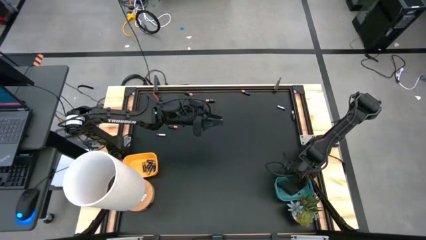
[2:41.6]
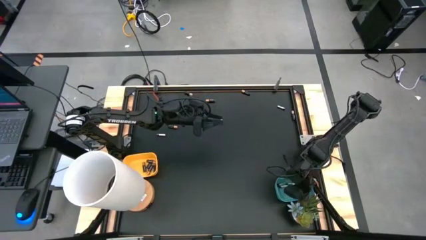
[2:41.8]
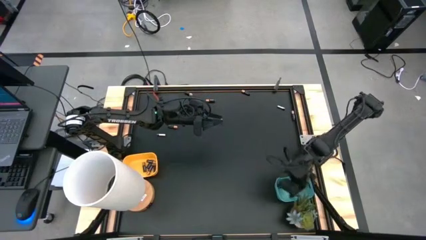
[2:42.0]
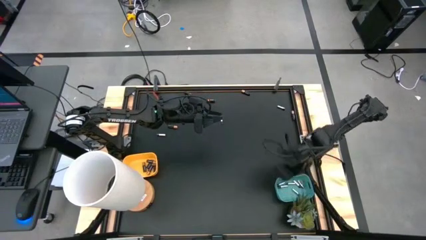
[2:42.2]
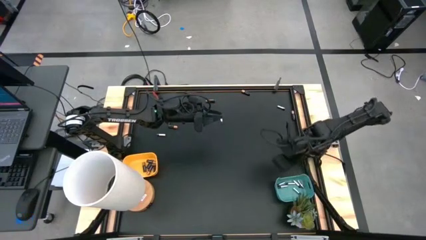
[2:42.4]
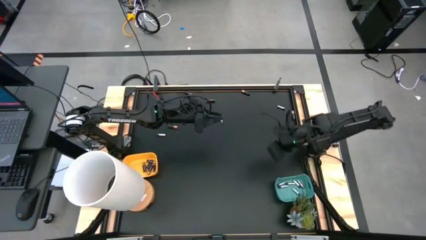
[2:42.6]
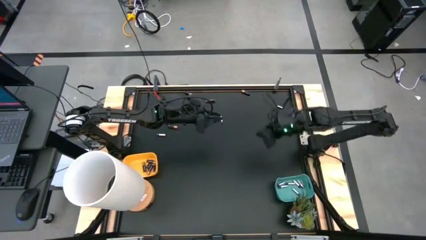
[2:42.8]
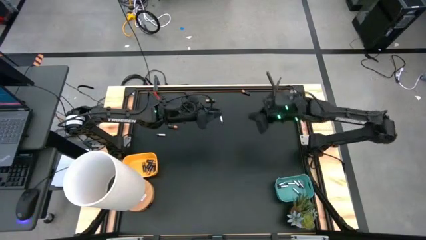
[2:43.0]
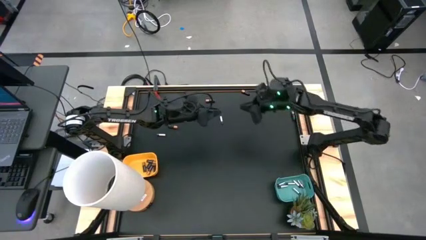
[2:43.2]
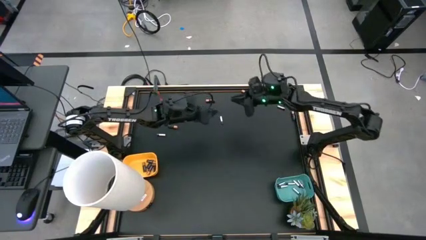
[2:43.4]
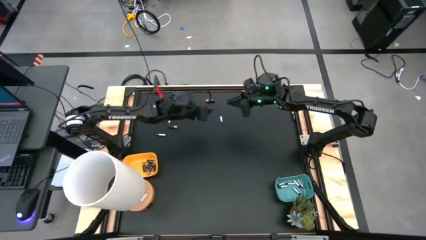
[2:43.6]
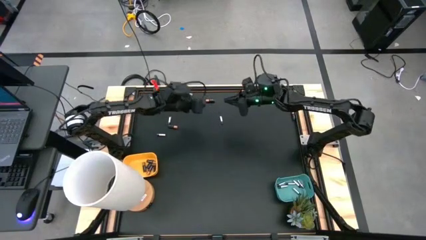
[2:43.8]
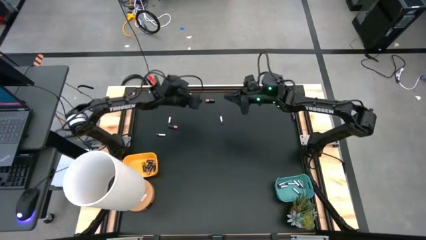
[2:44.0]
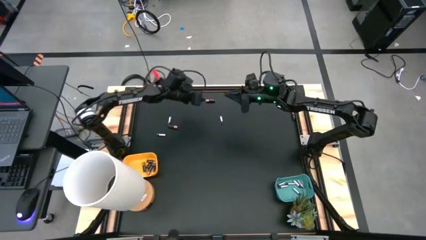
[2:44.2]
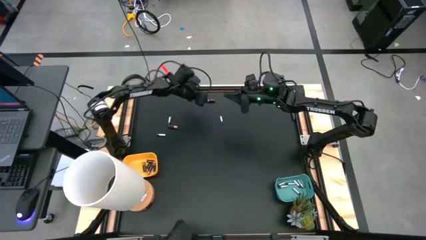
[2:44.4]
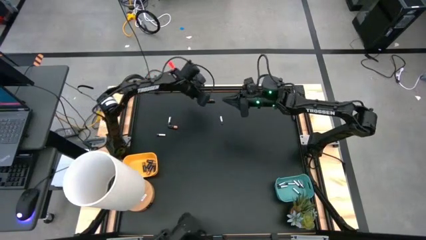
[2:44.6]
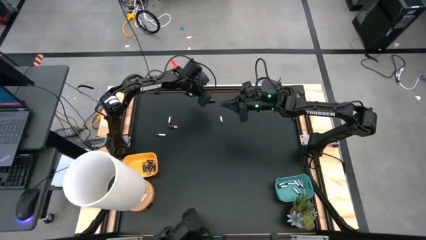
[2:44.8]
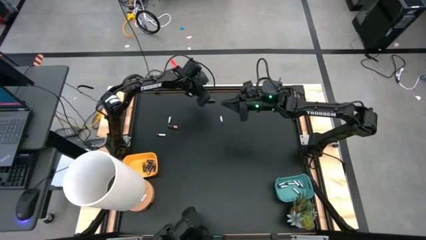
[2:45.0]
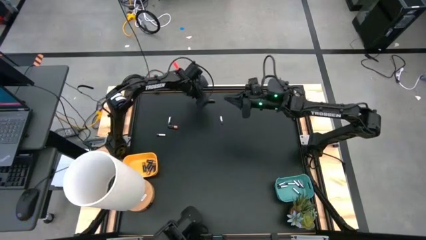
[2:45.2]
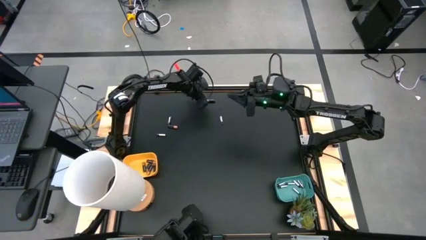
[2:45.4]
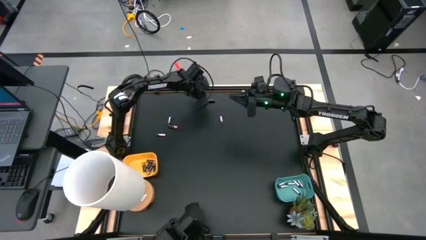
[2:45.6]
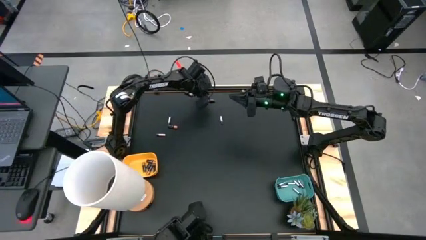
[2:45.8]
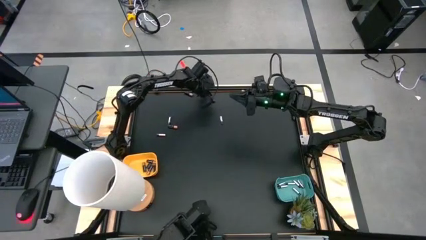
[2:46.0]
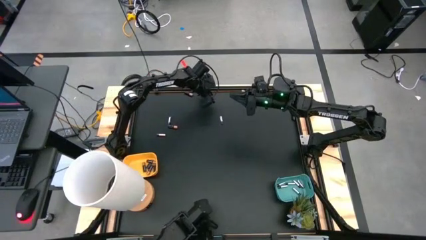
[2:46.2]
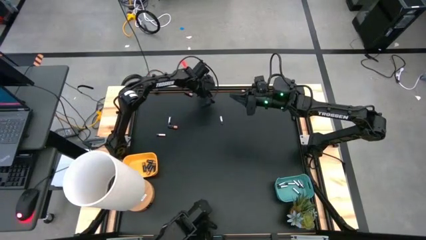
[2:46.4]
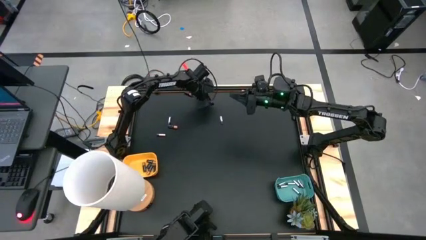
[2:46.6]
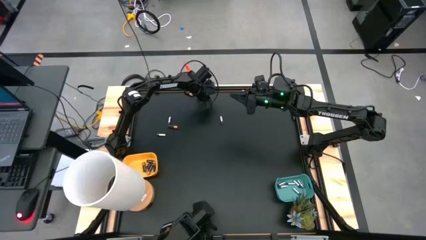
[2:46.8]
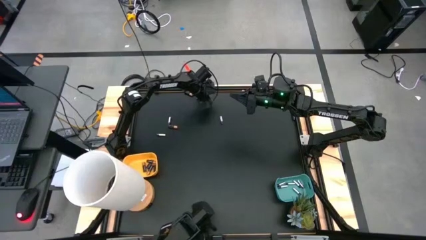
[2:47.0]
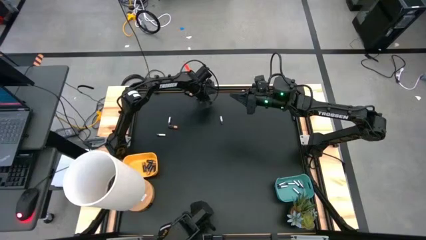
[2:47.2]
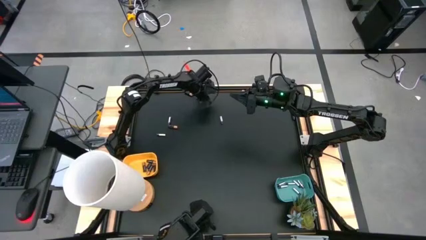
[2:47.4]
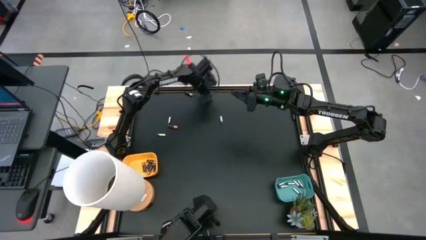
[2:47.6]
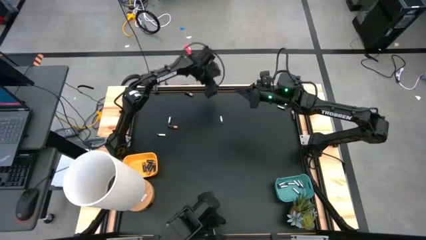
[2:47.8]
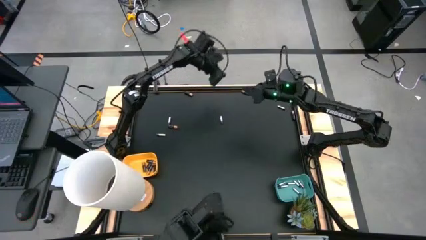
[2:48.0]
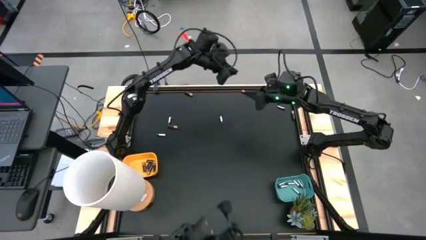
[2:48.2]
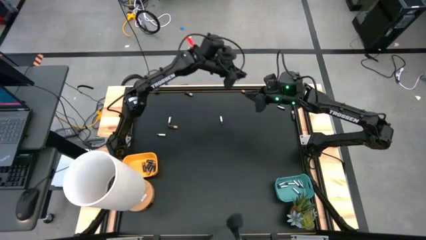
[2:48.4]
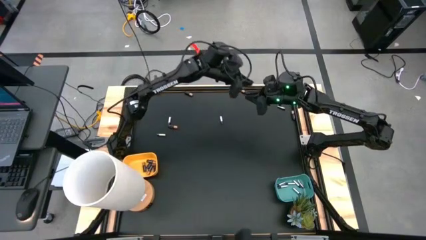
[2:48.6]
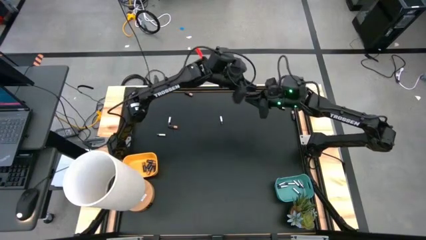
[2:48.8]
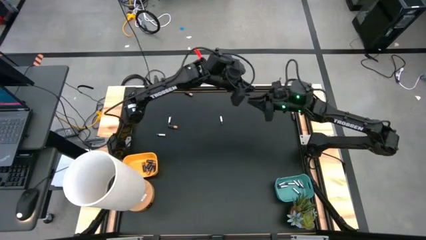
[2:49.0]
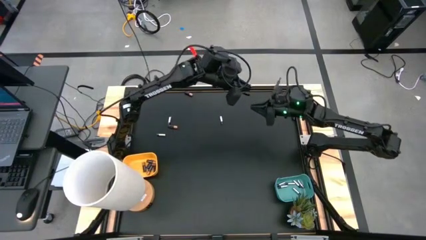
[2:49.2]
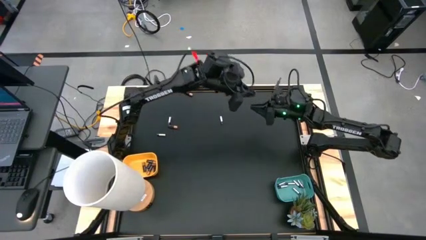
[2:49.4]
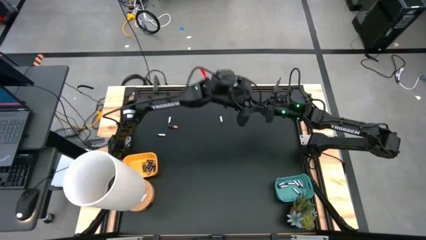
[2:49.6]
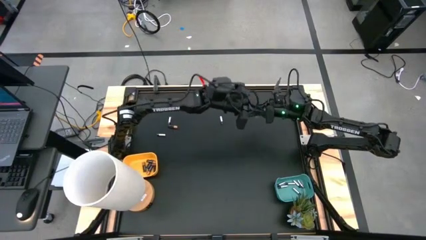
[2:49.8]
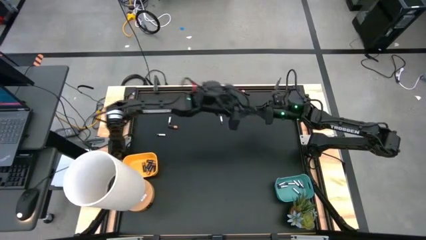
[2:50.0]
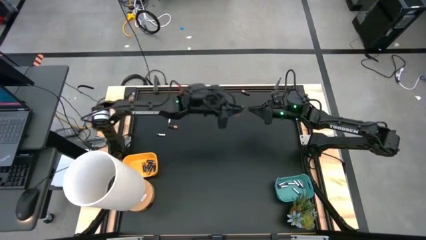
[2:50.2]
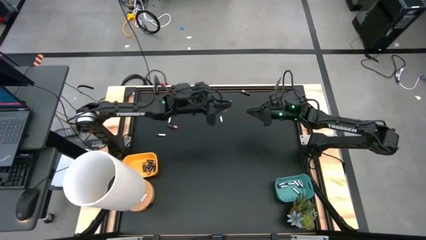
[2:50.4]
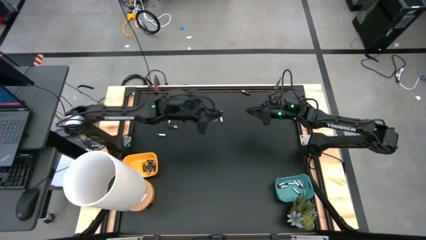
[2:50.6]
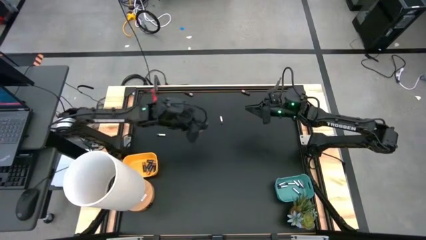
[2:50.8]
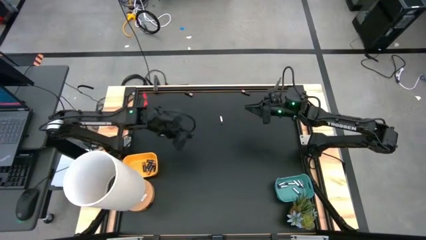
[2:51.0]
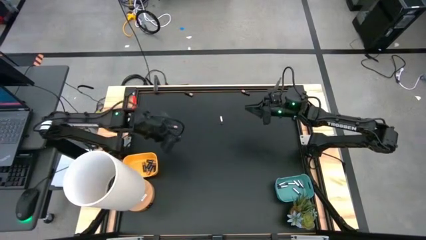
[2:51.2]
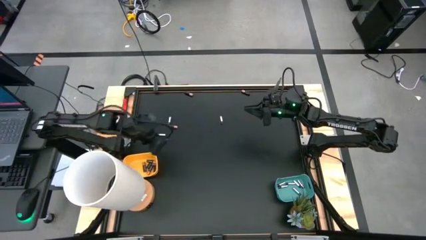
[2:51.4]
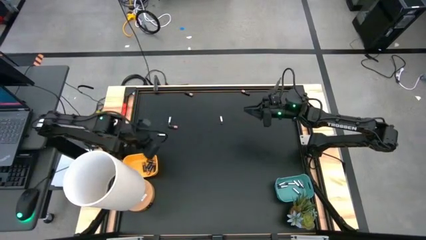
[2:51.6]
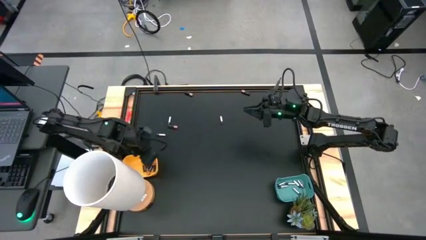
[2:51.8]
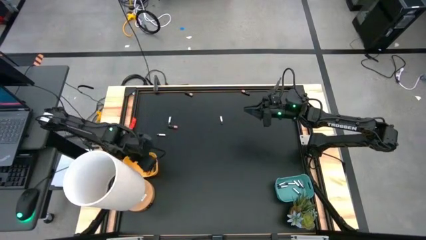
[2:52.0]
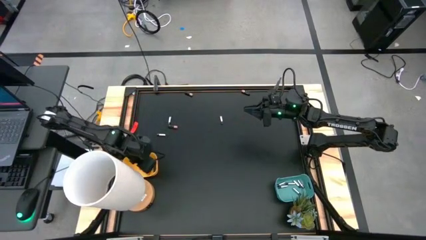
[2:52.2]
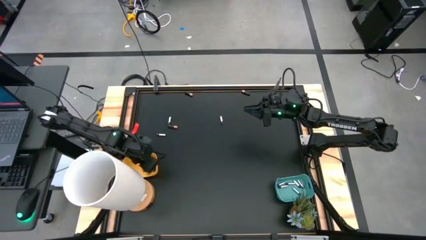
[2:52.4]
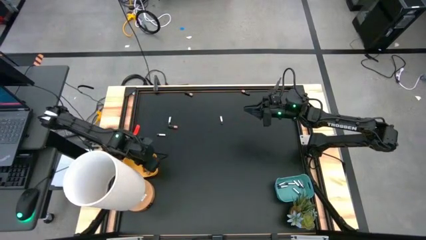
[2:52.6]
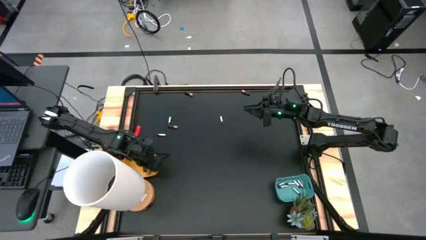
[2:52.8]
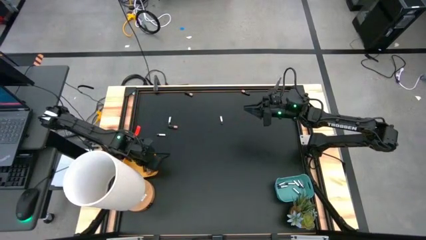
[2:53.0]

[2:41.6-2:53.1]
Task: Sort batteries
Put the black battery into the yellow bin

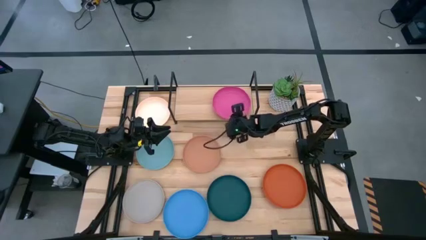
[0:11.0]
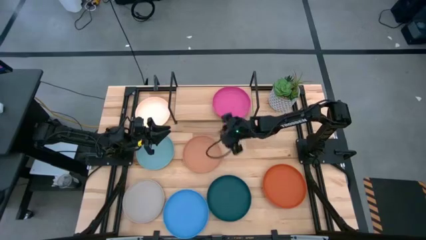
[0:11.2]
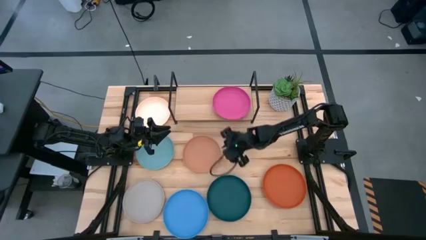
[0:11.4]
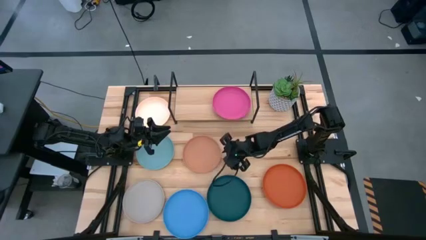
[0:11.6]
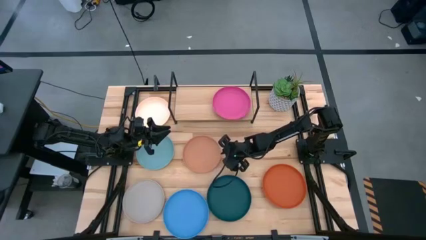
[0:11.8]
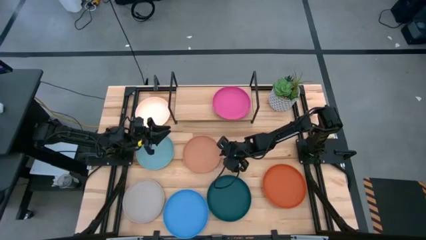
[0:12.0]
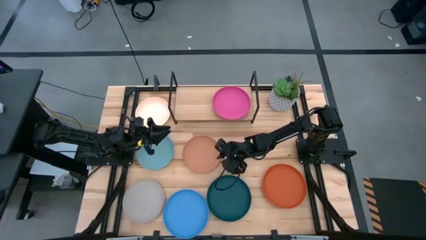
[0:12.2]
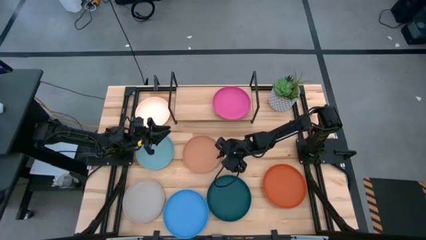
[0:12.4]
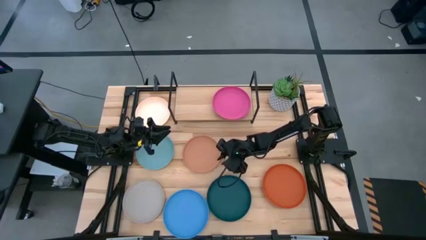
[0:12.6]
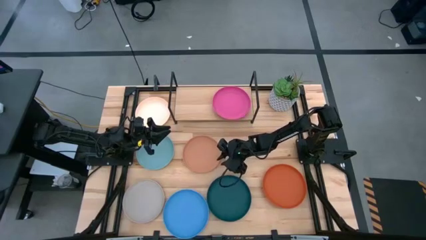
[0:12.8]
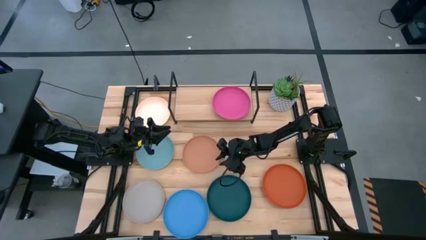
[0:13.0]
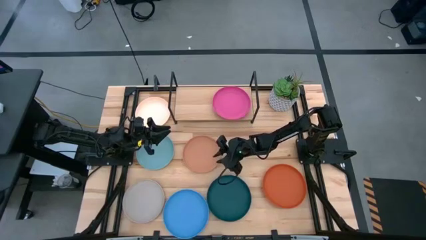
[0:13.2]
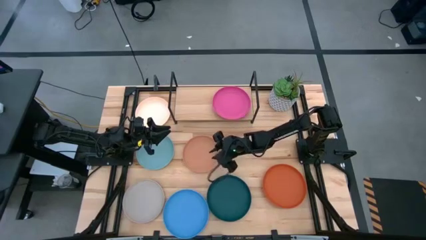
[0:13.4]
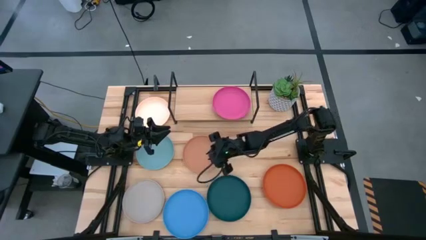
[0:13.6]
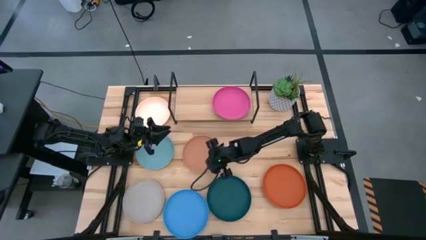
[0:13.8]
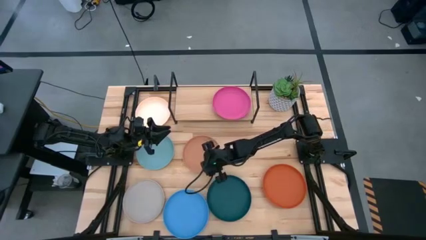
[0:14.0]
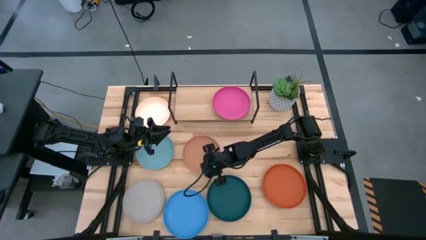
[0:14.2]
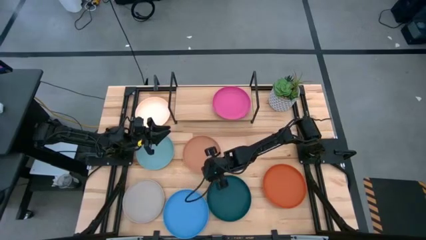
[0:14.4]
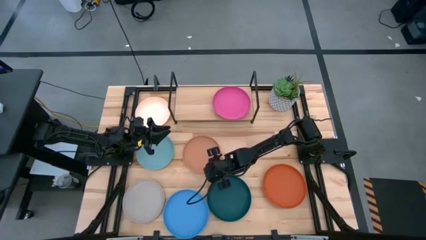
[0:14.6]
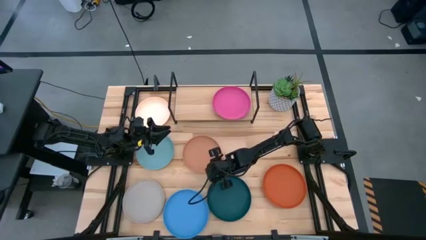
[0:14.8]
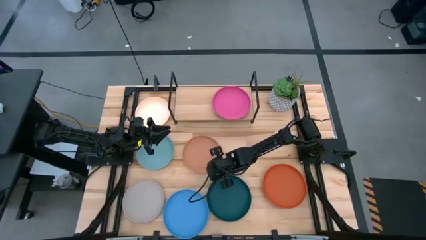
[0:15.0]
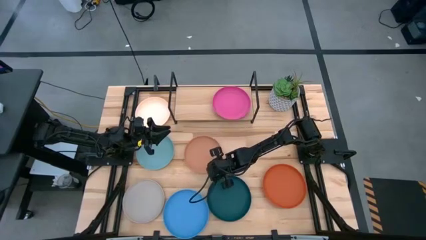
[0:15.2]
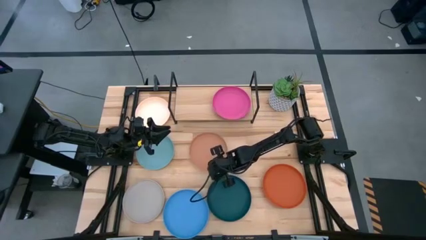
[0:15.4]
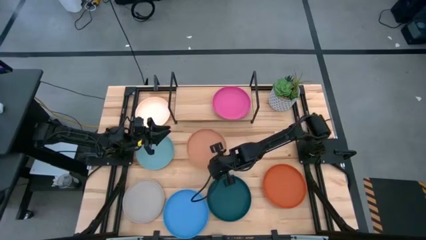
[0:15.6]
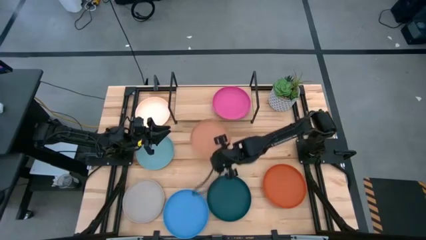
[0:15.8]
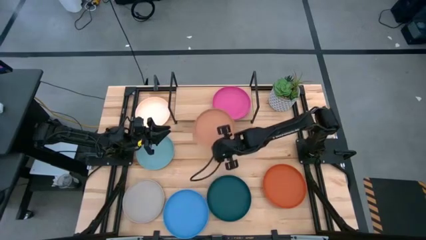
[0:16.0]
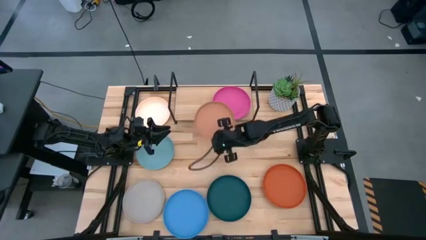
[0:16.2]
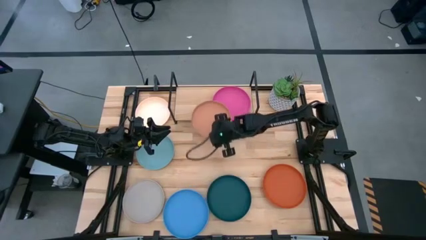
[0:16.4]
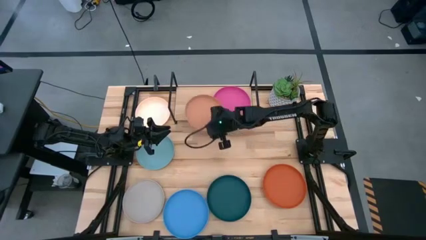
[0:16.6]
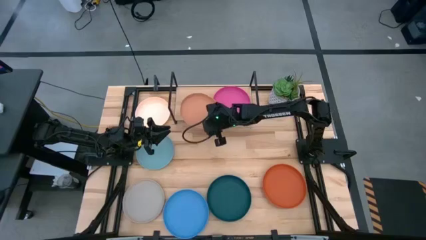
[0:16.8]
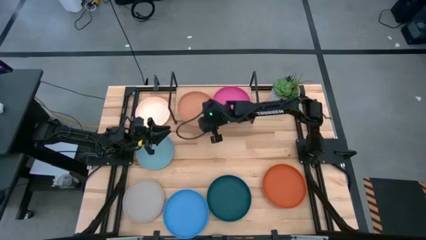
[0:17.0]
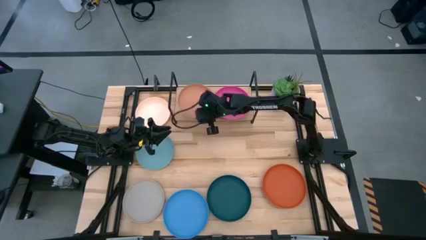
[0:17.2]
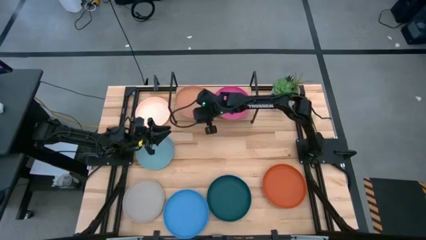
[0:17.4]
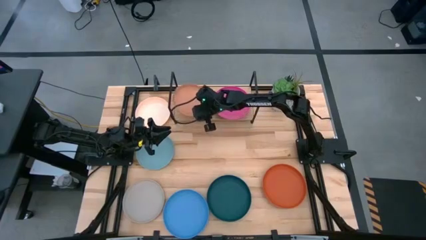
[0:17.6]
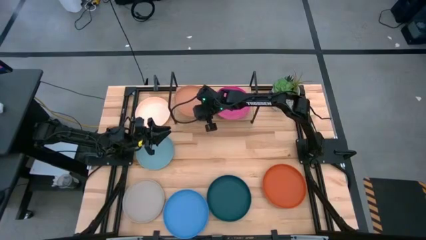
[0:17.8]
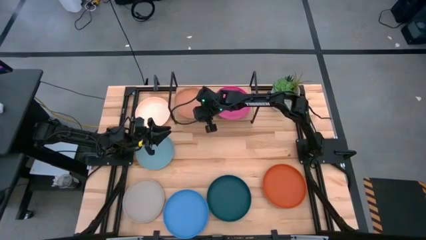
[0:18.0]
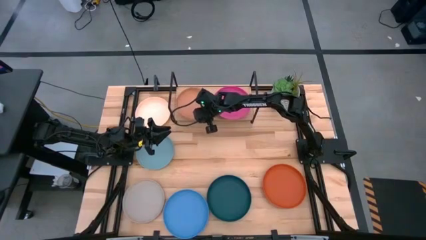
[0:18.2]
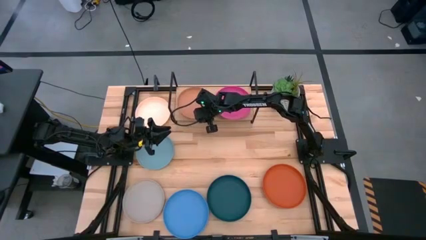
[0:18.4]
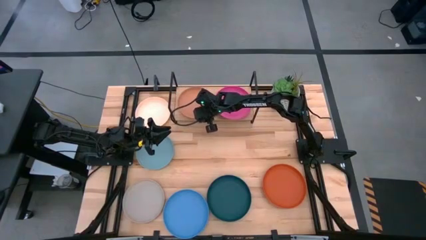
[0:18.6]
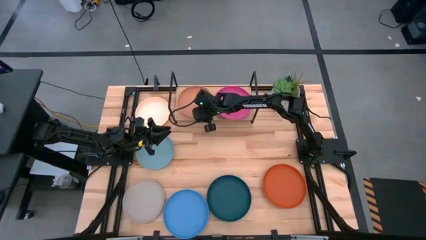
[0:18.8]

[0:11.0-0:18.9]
Task: Place and stack plates onto a shelf
Put the brown plate on the shelf
